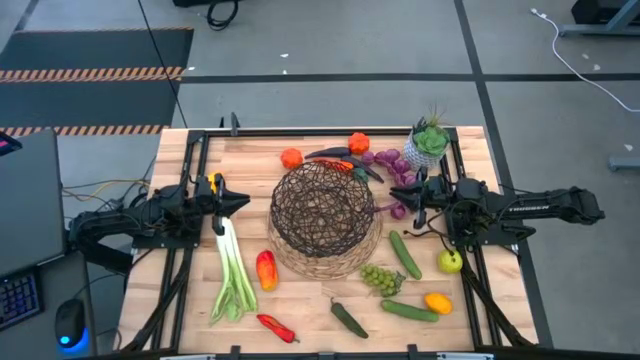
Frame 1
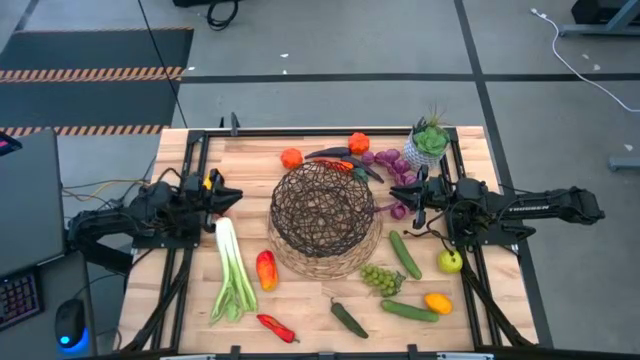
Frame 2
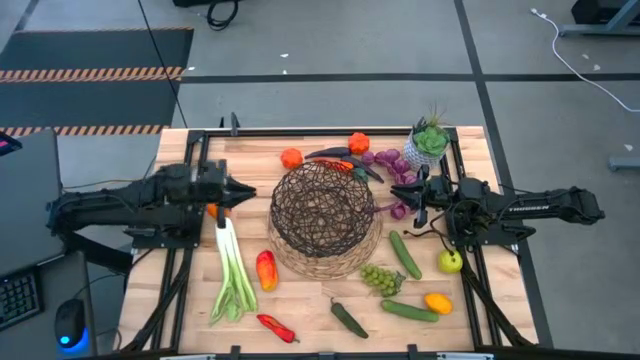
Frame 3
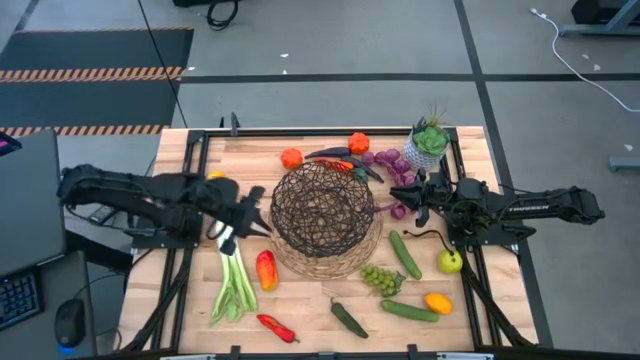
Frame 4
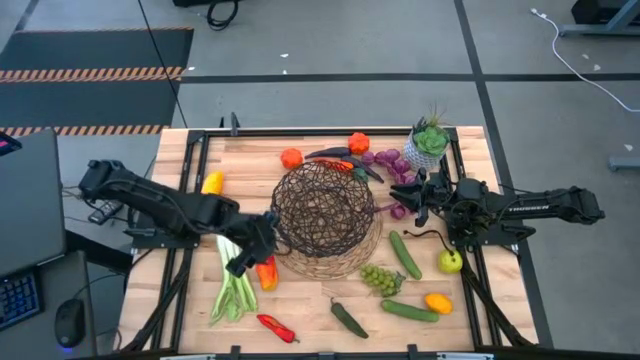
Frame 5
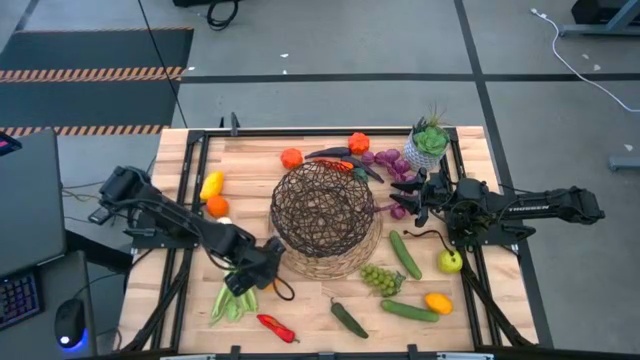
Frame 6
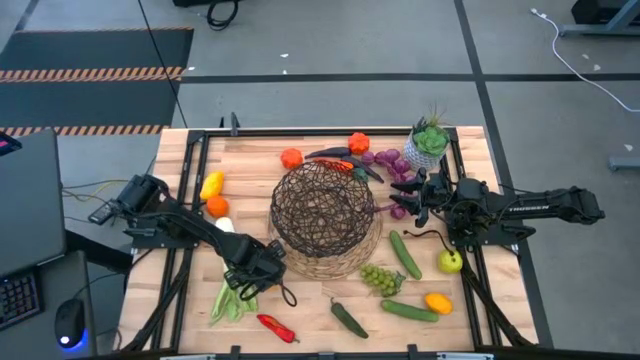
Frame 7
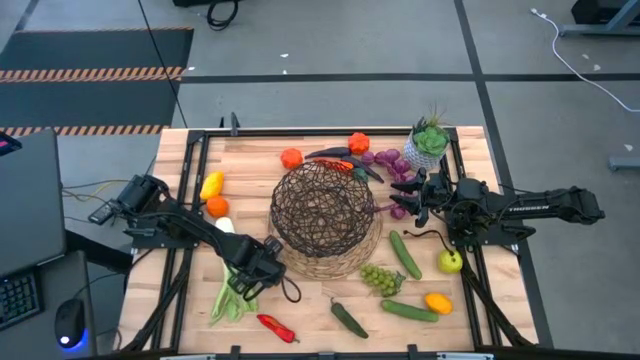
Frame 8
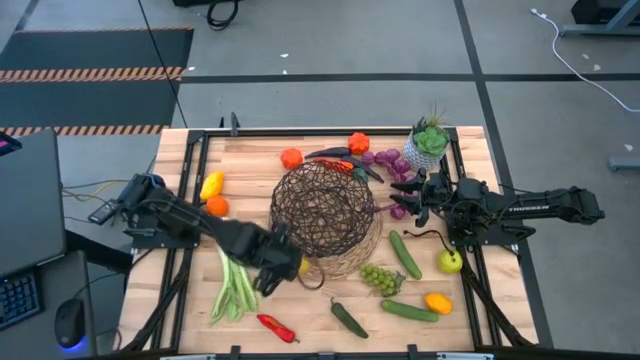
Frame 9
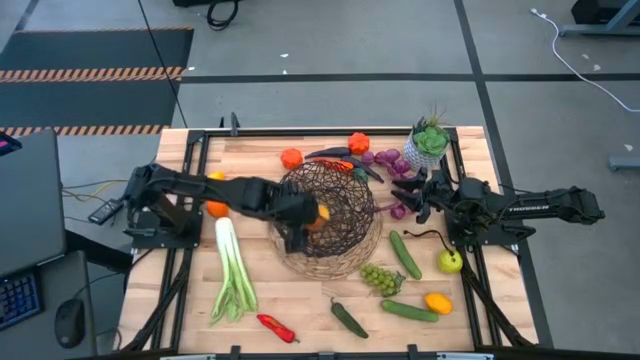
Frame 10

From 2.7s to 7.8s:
Task: Build produce basket
Put the red mango into the black basket

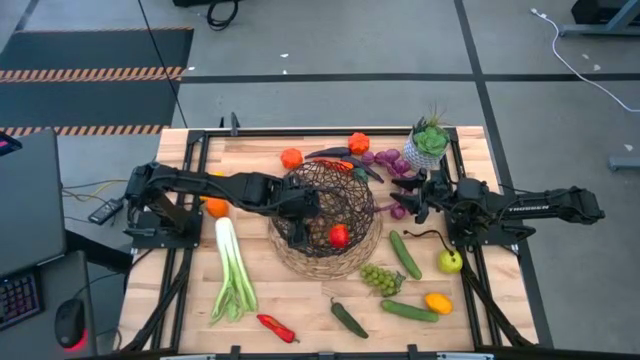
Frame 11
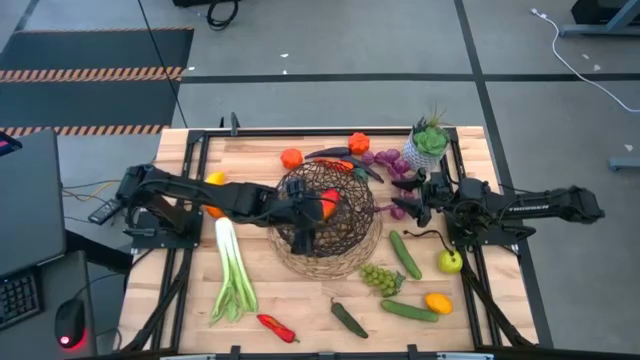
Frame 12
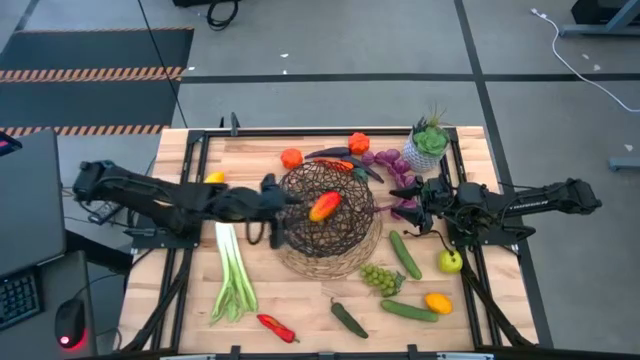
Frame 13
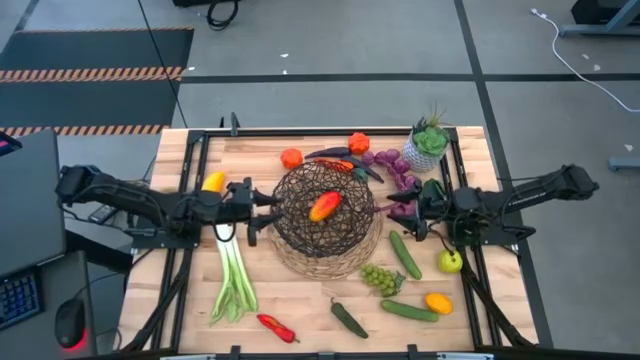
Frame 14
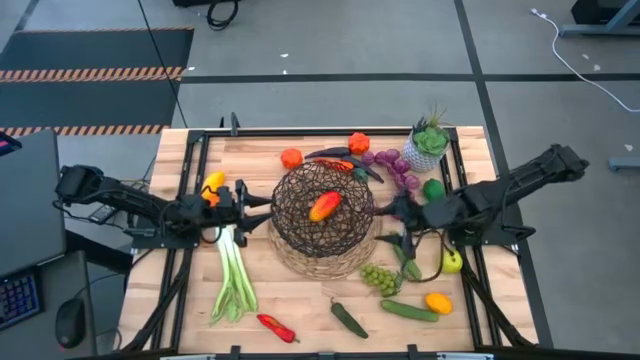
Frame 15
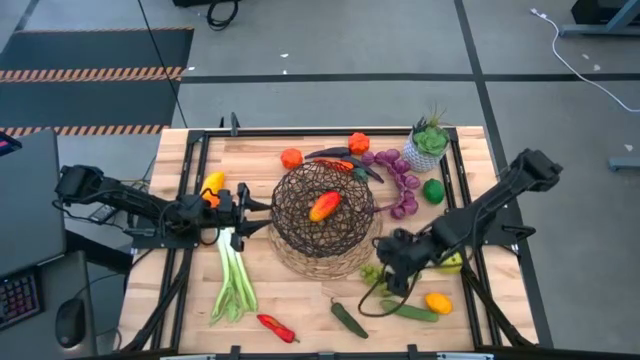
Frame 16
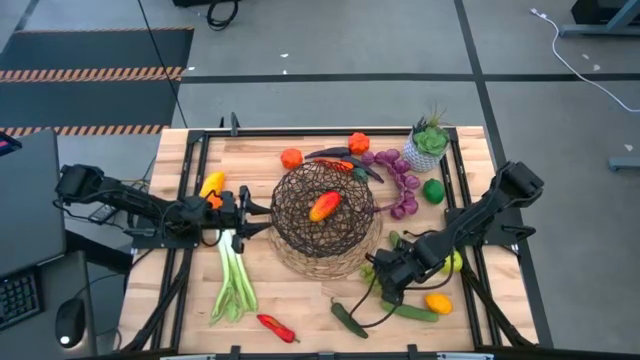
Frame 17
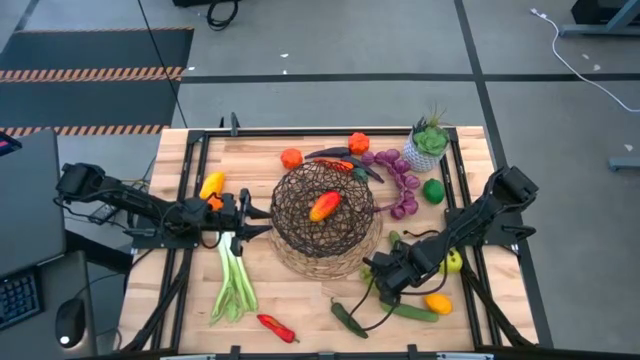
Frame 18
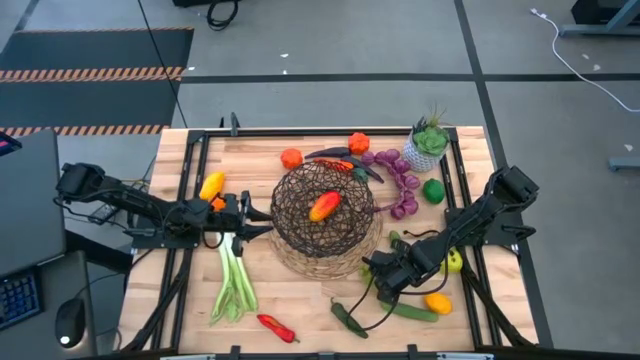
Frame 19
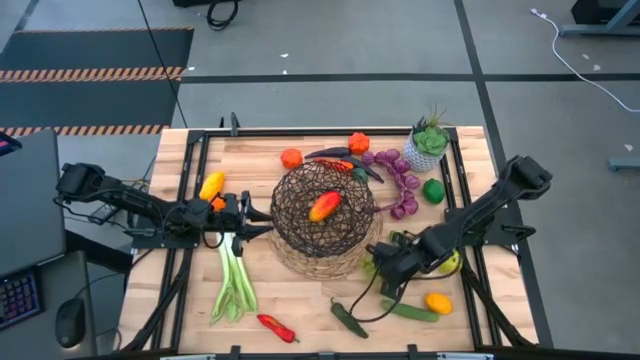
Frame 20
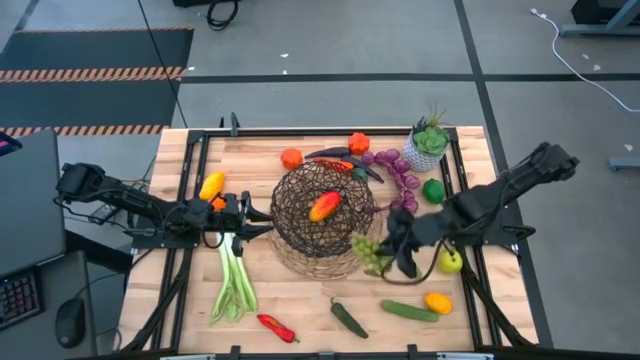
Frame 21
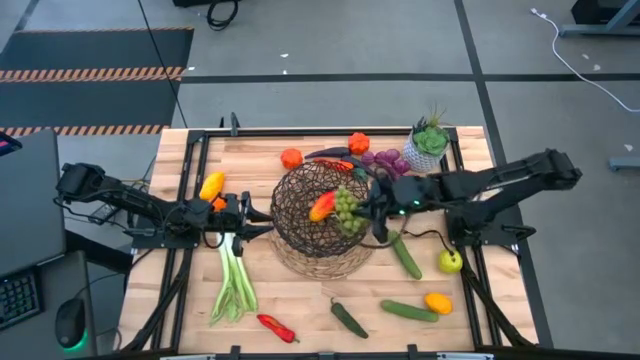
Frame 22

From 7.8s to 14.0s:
Put the green grapes into the black basket

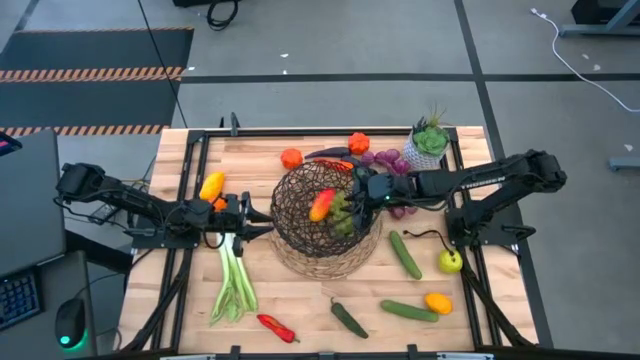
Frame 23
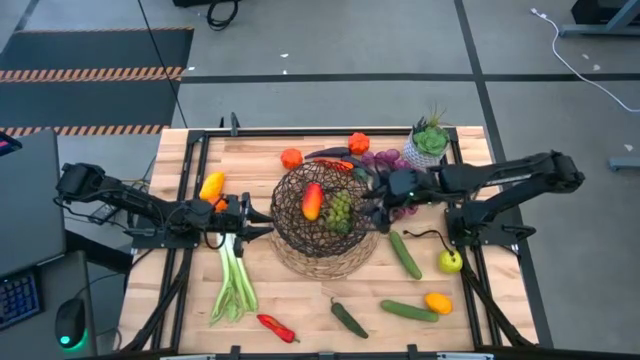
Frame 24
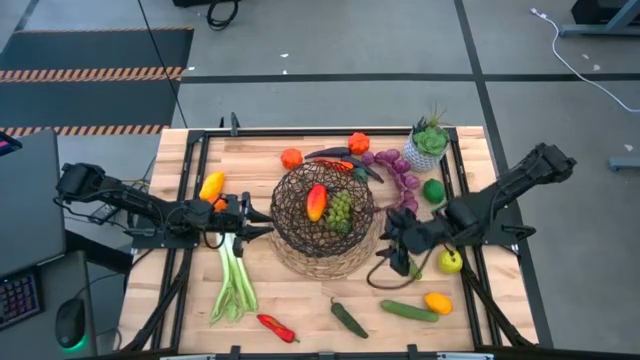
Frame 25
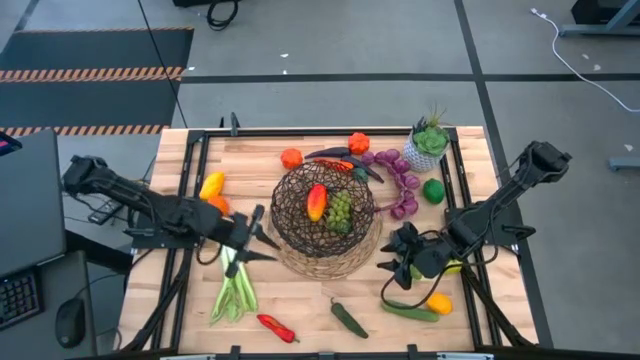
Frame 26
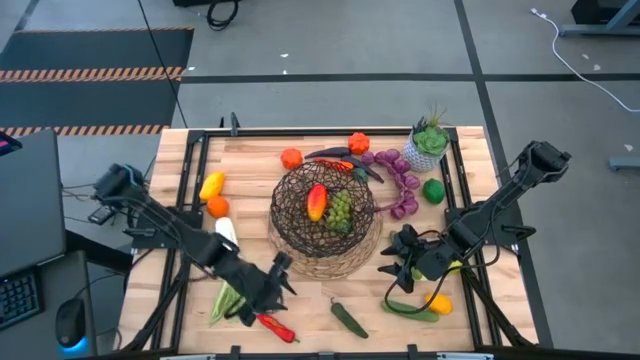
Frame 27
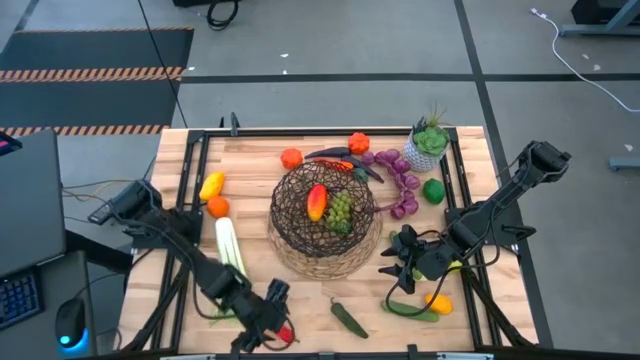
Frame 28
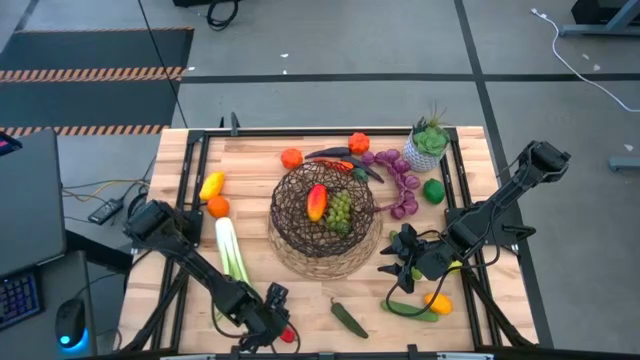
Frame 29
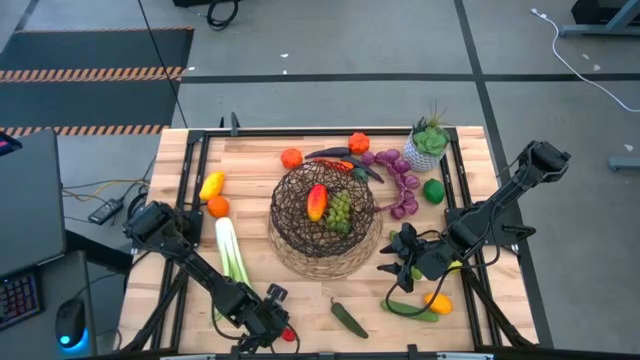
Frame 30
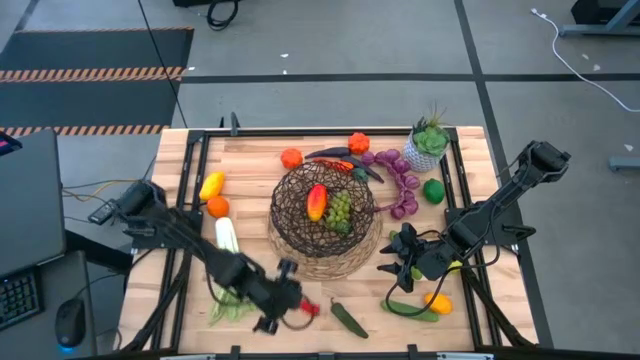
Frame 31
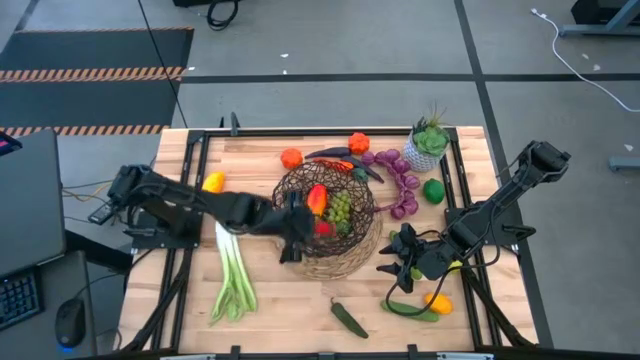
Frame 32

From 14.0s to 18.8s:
Put the red chili pepper into the black basket

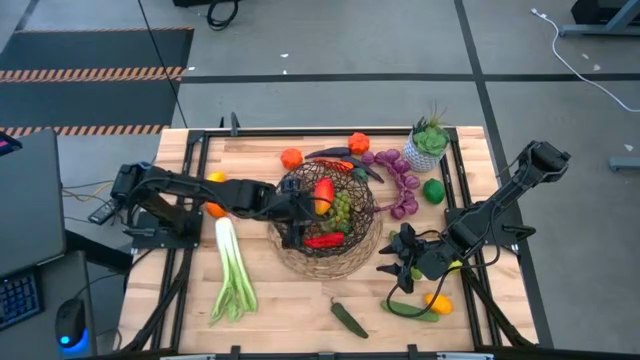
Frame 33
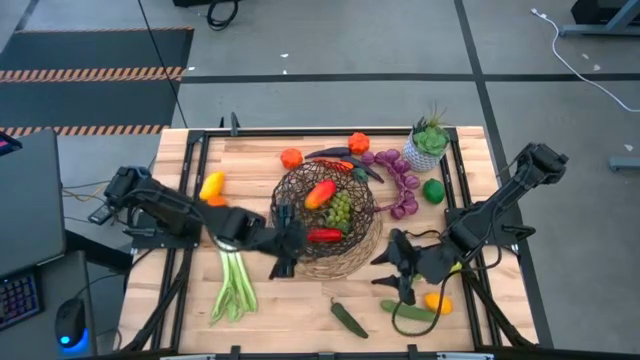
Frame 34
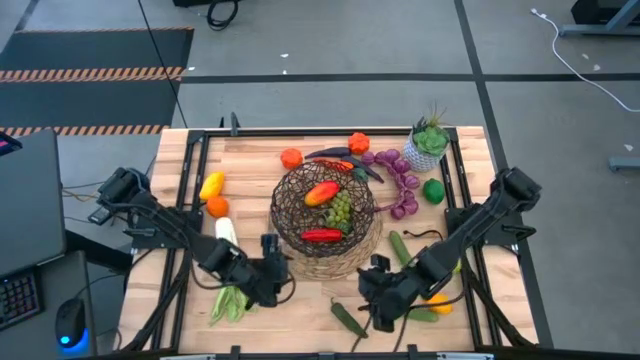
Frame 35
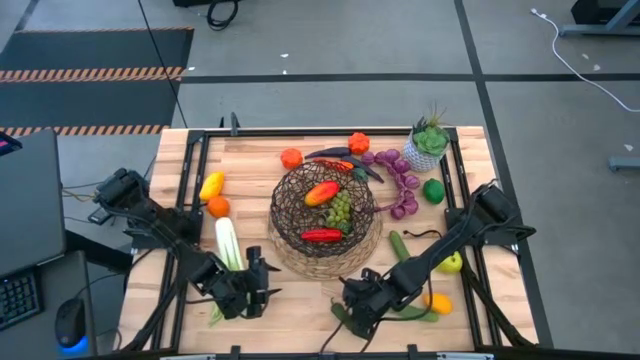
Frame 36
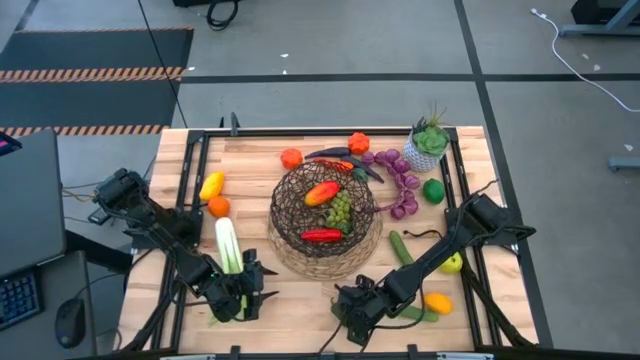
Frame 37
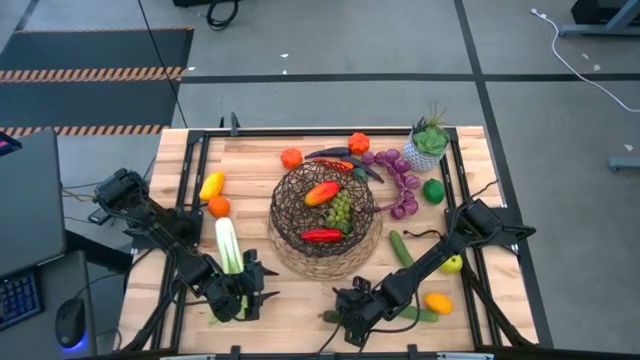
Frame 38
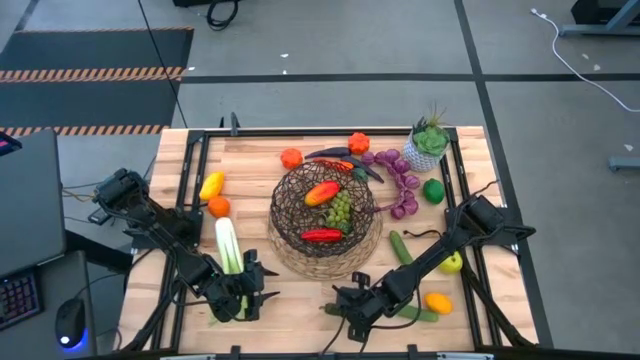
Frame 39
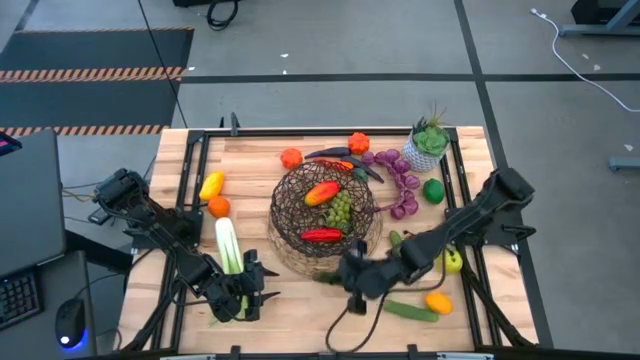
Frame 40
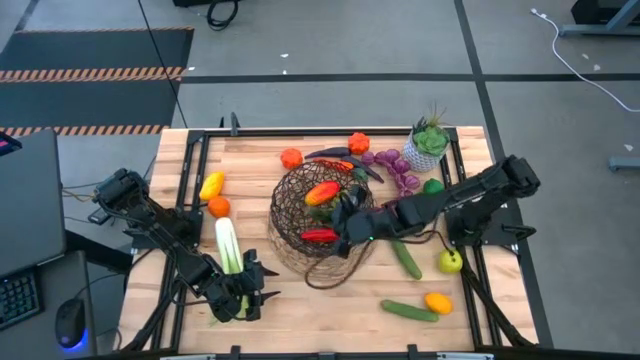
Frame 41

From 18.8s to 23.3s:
Put the green chili pepper into the black basket

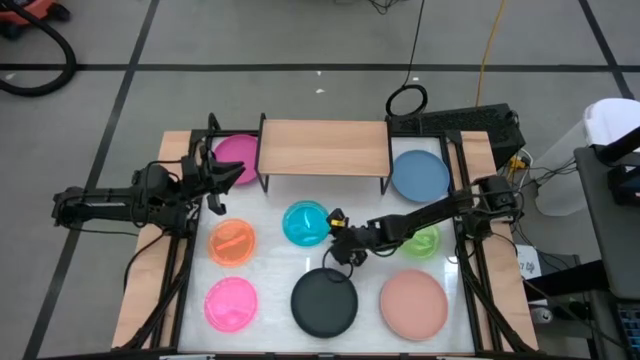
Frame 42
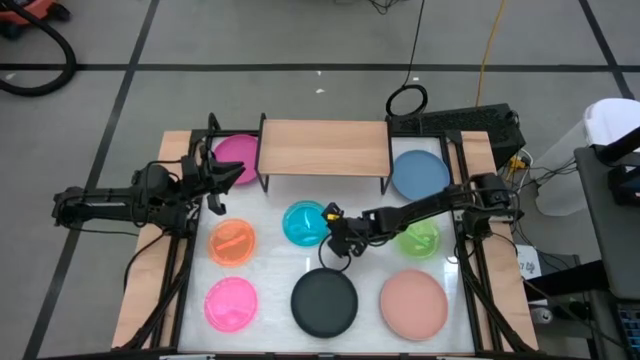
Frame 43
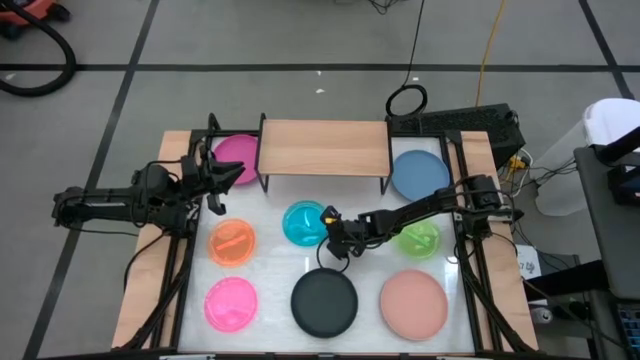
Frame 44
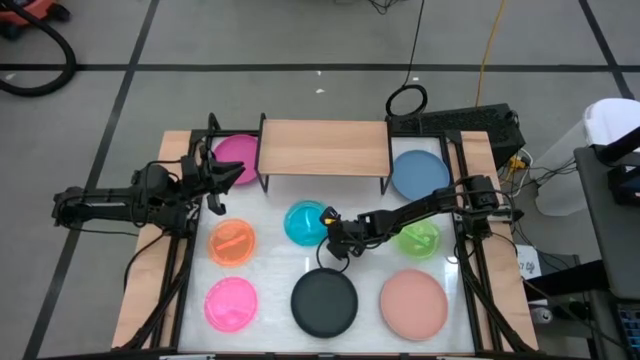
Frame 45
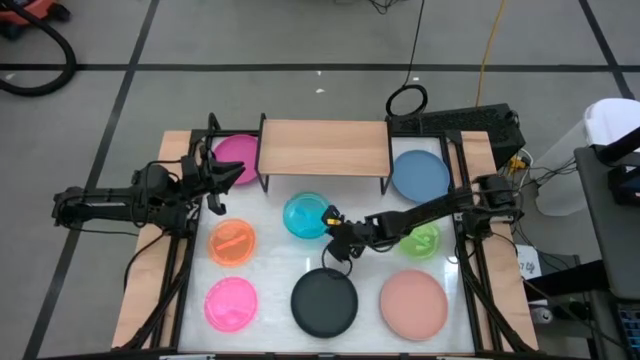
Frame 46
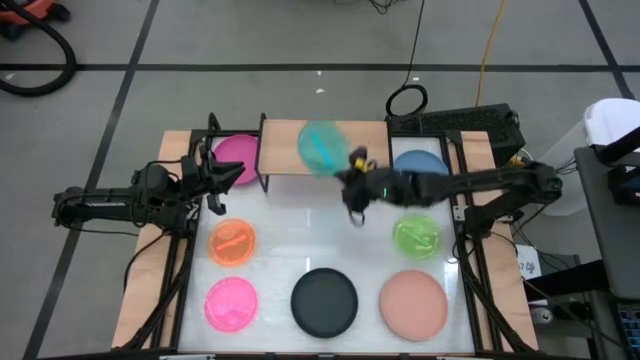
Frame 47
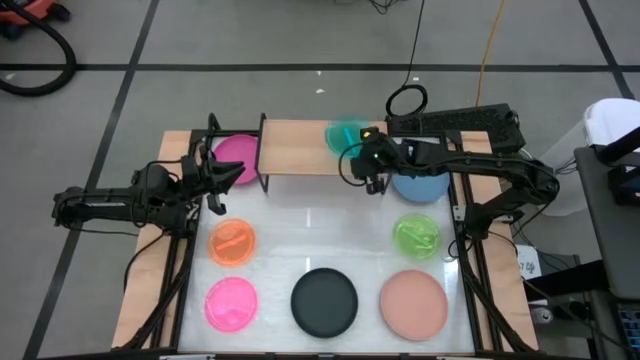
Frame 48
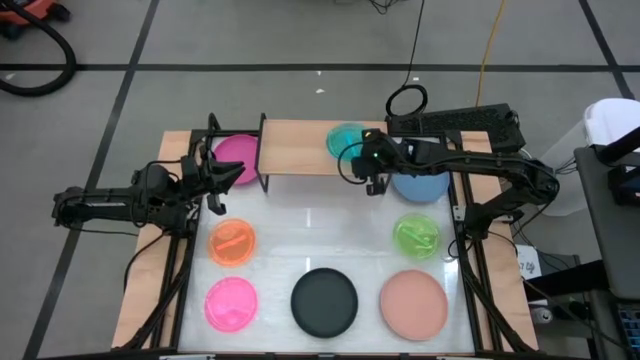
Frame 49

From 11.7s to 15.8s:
Task: Place and stack plates onto a shelf
Put the light blue plate on the shelf
